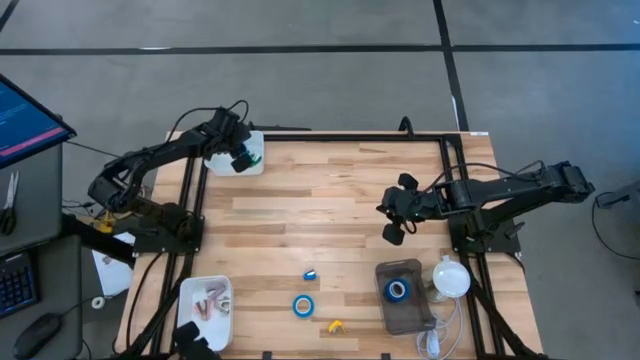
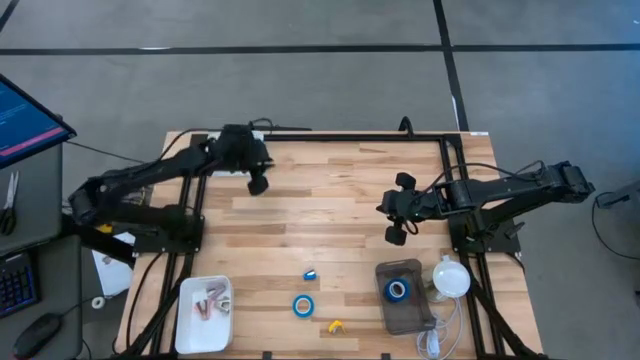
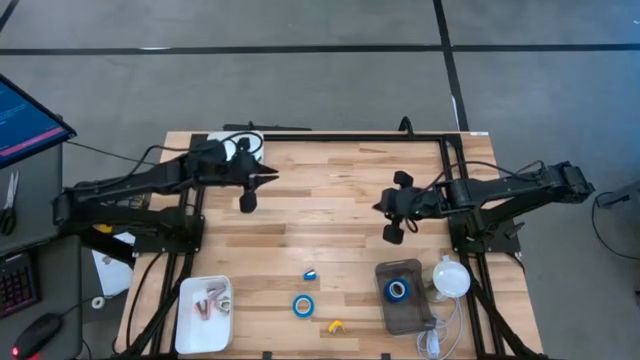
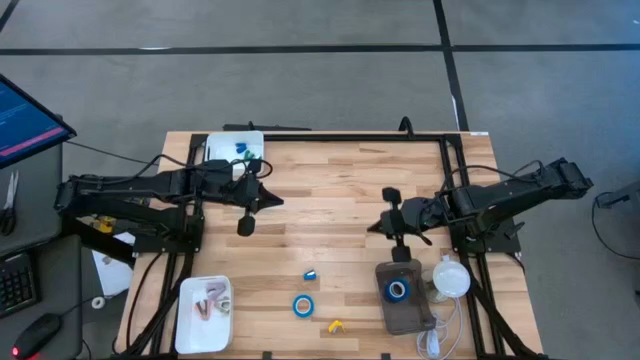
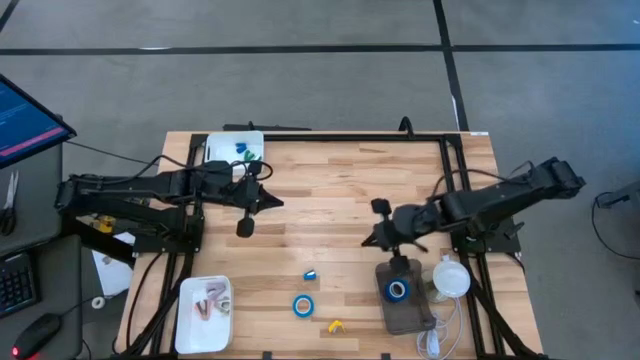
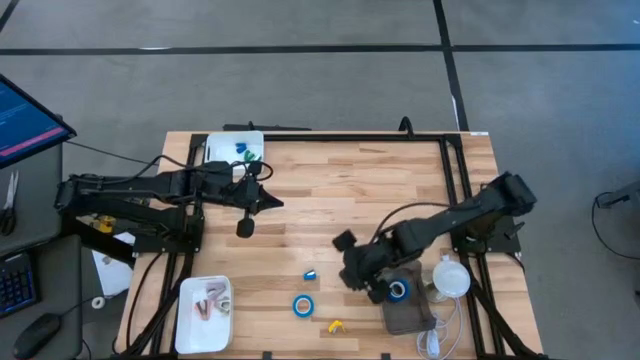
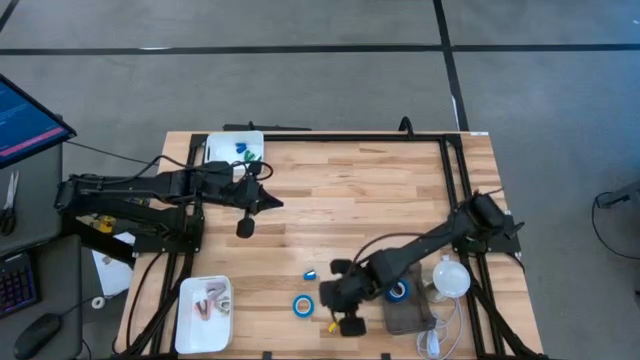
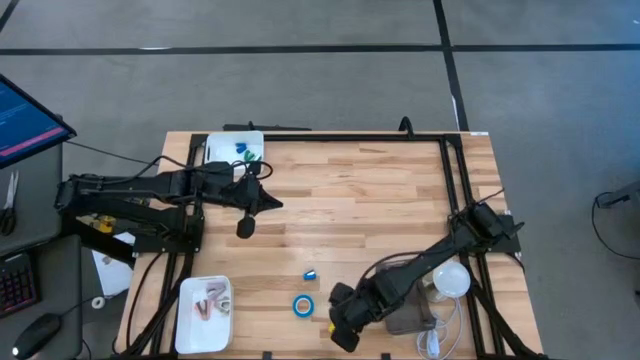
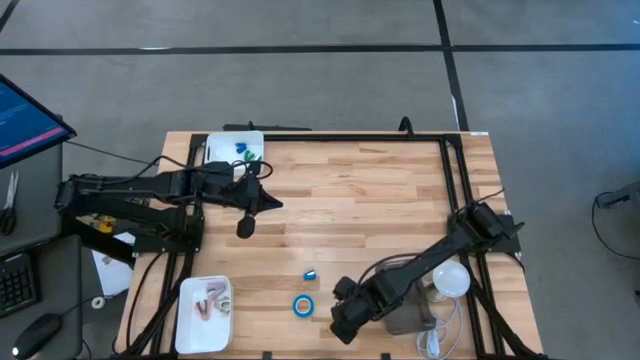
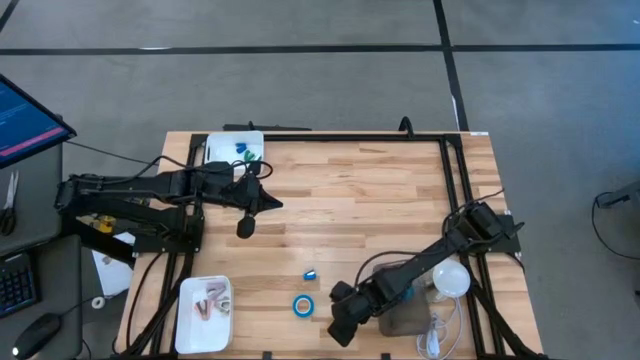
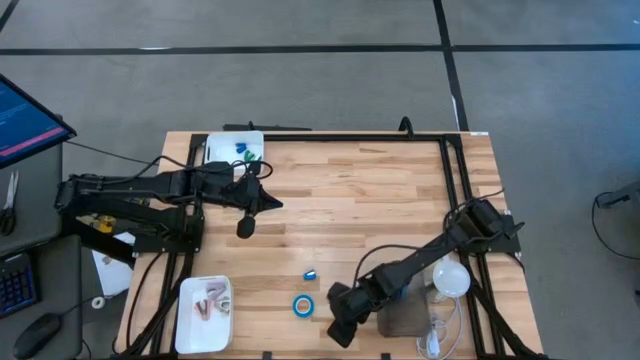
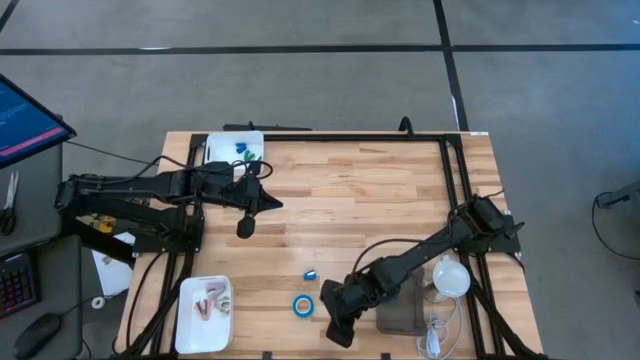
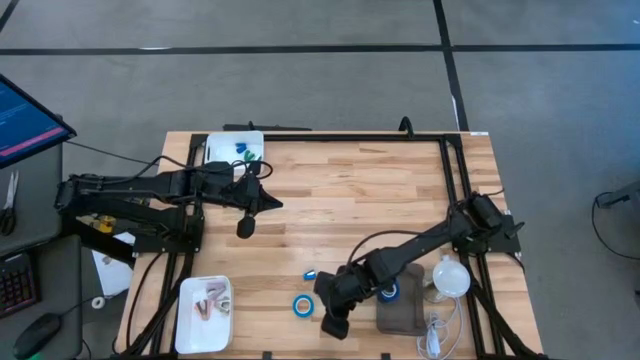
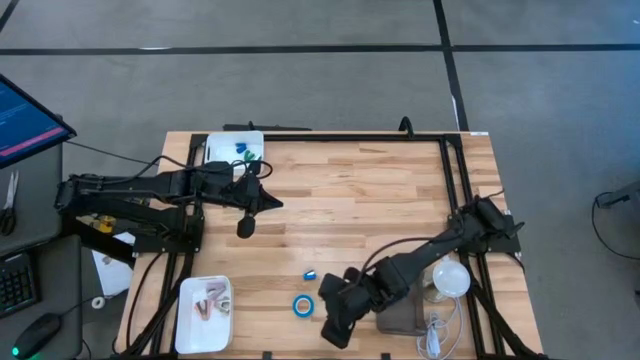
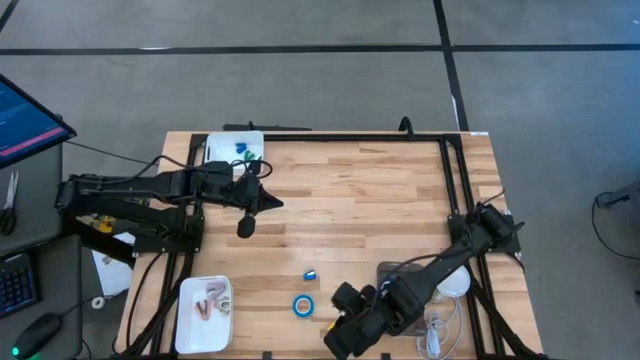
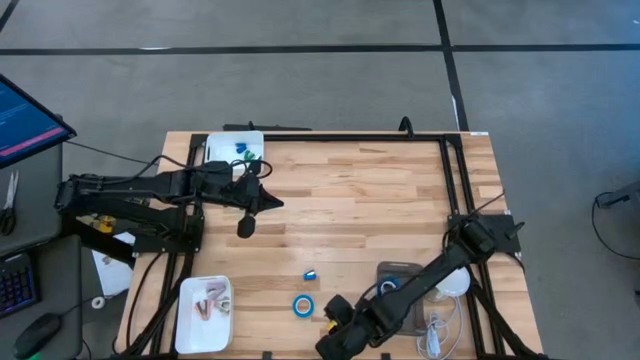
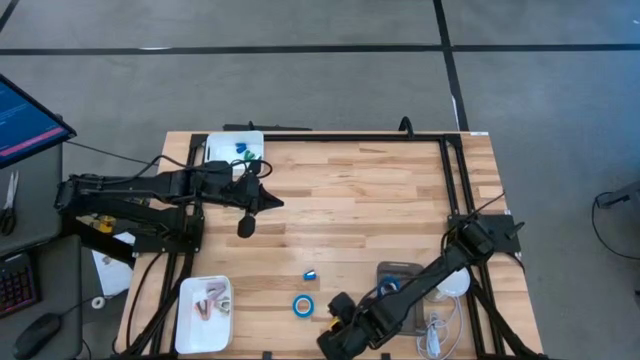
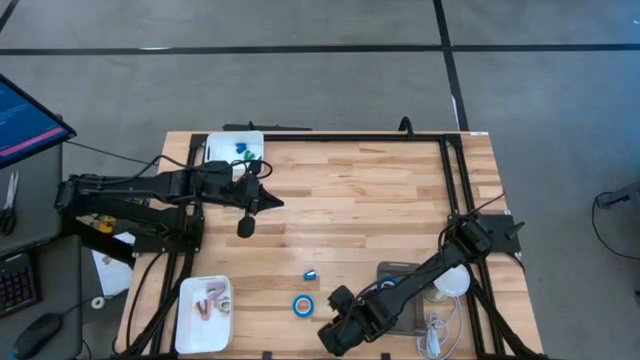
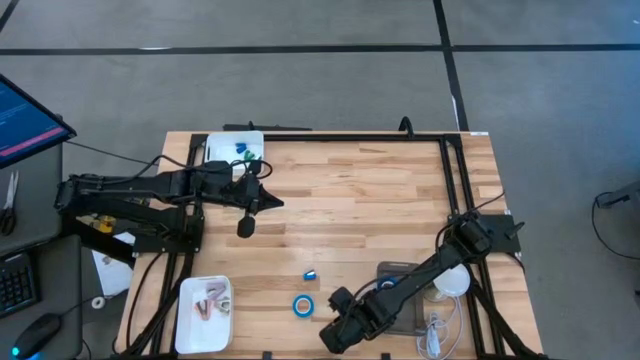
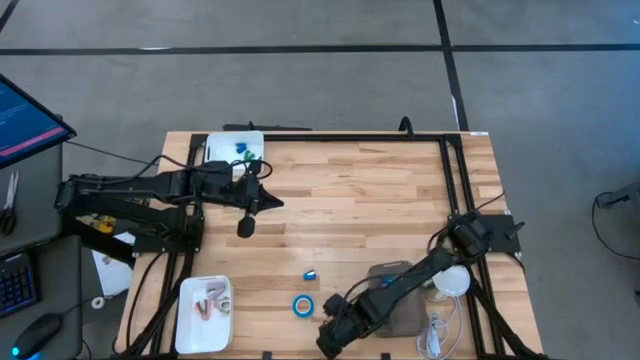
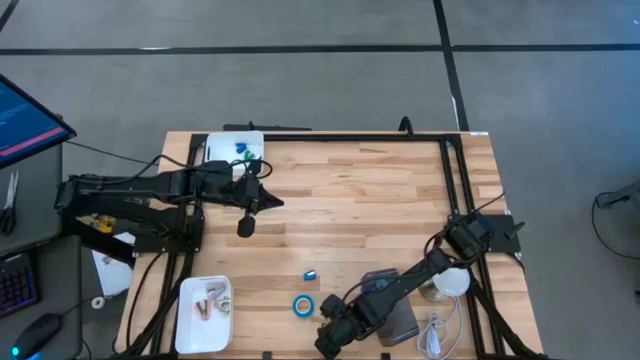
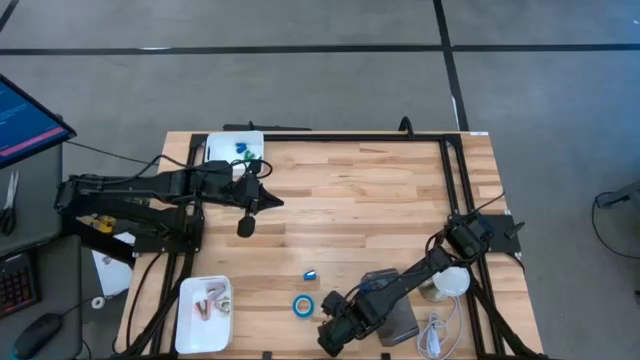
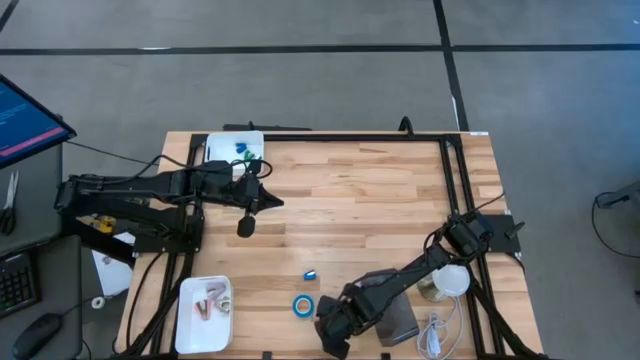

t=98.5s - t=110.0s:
Task: Pick and place Stapler, Stapler remover, tape
Put the yellow stapler into the top white bin

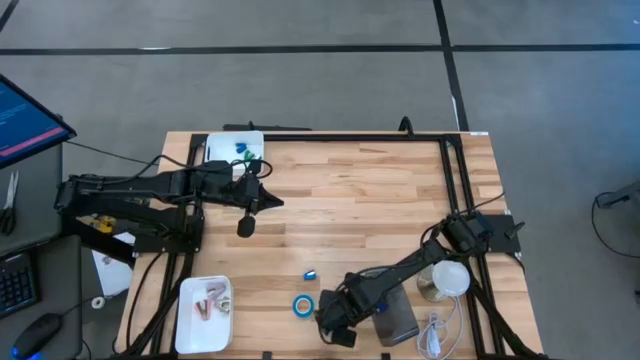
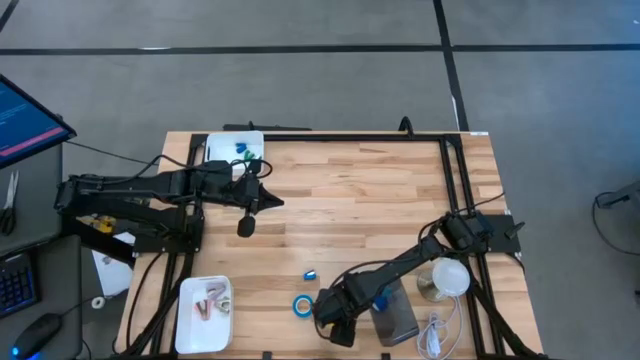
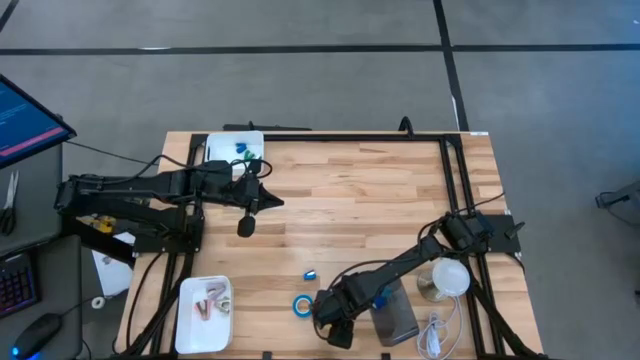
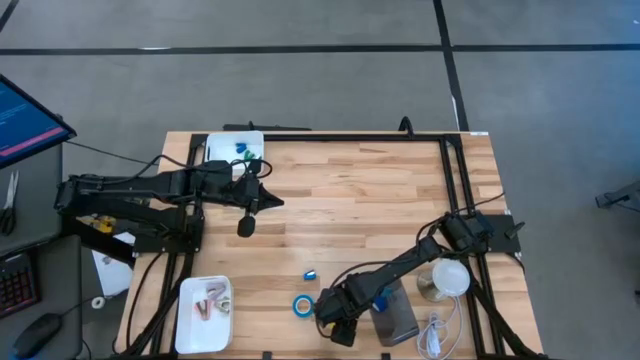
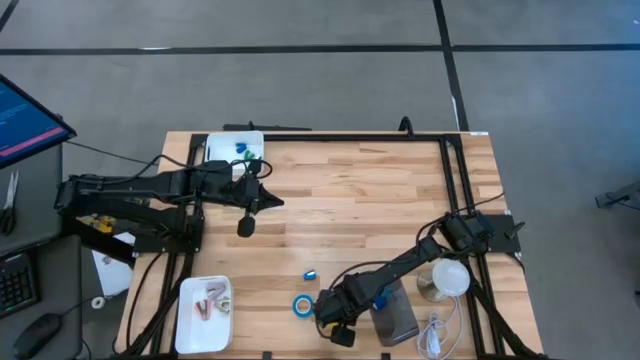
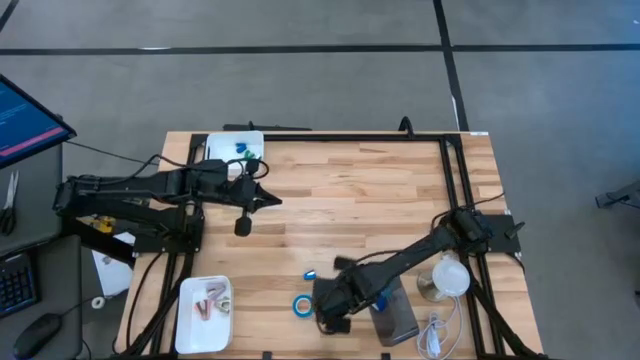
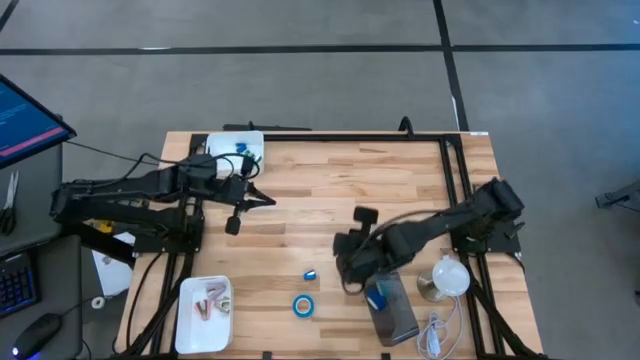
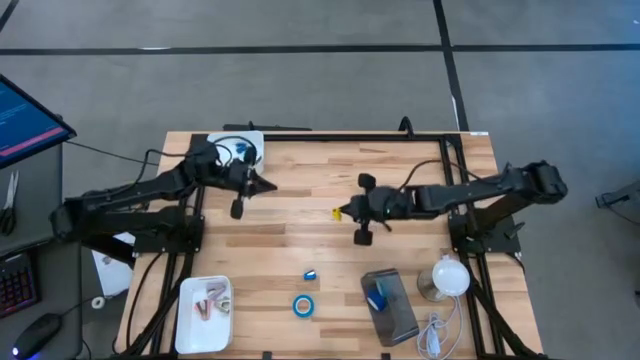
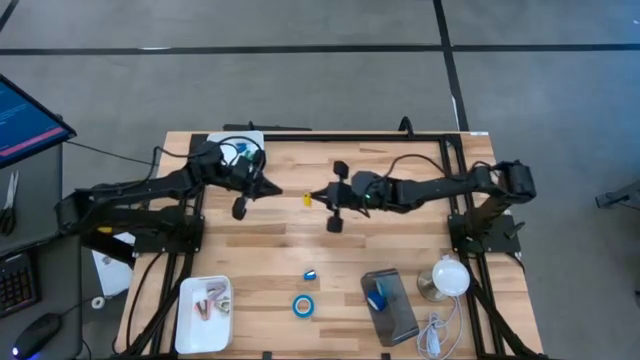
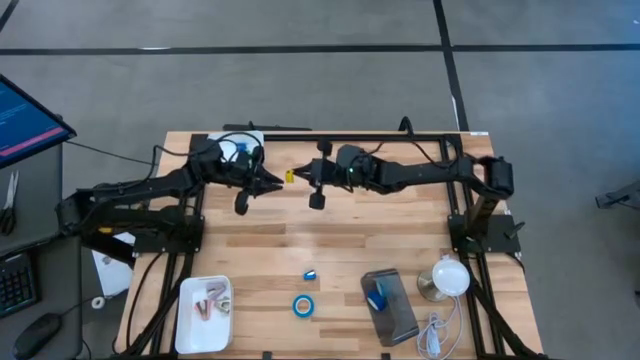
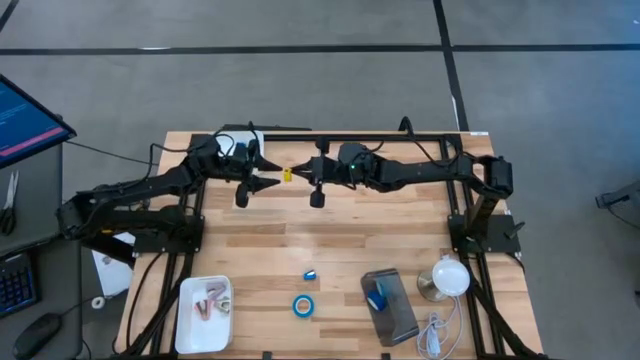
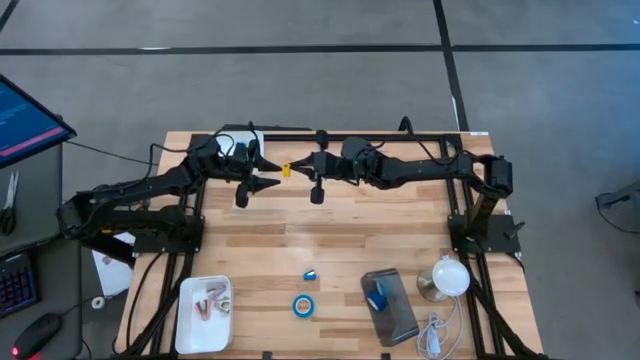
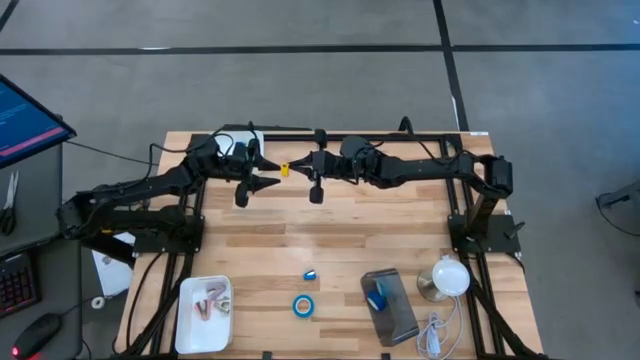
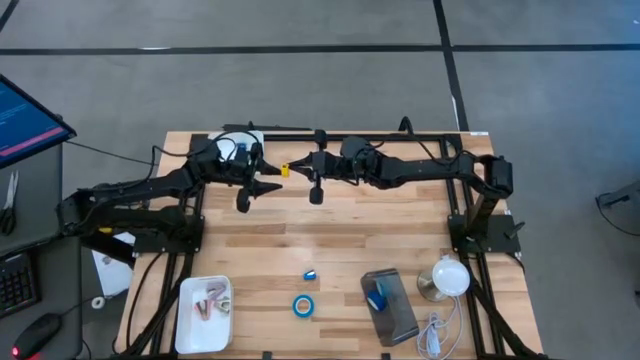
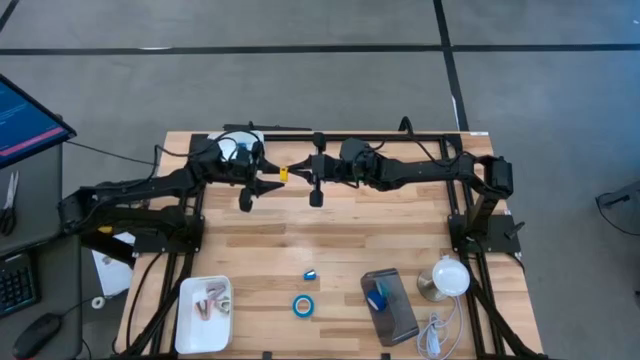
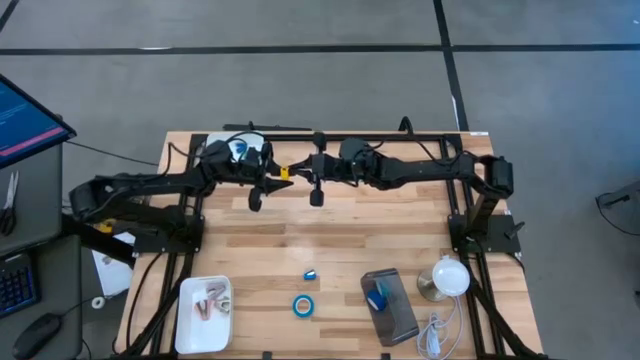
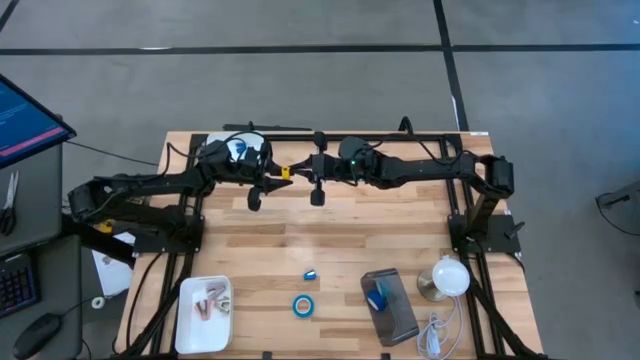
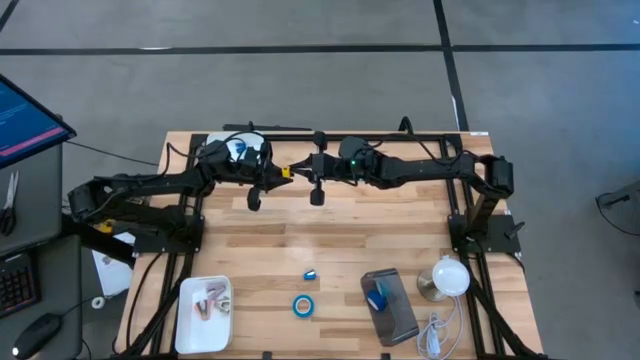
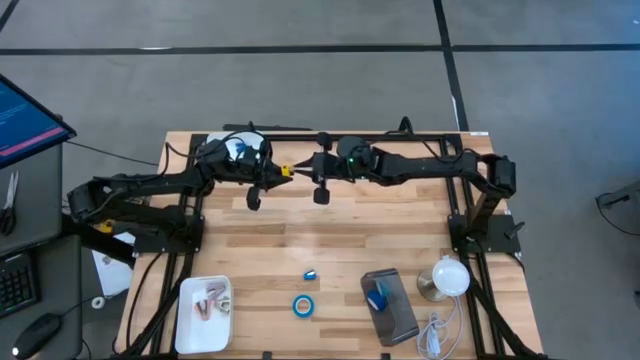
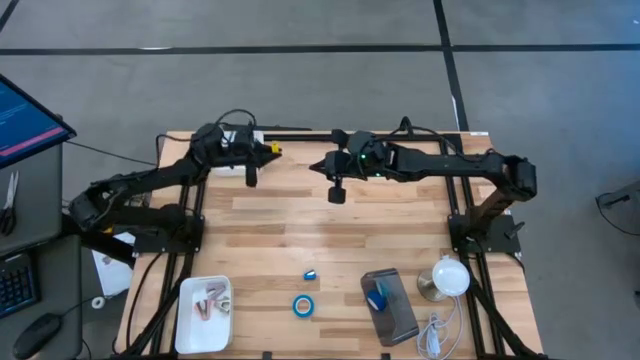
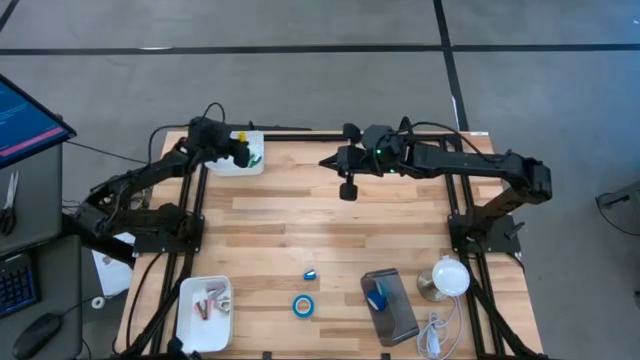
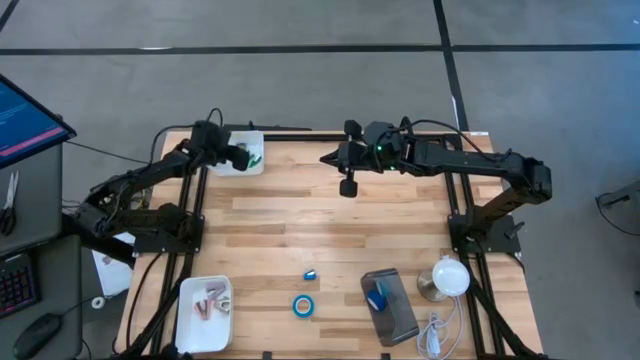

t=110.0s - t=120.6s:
Put the yellow stapler into the top white bin
